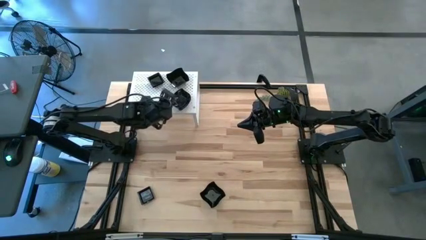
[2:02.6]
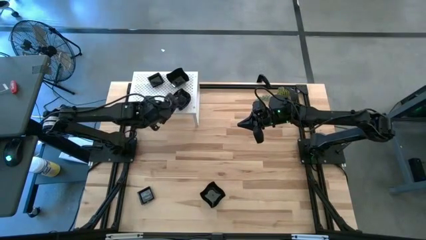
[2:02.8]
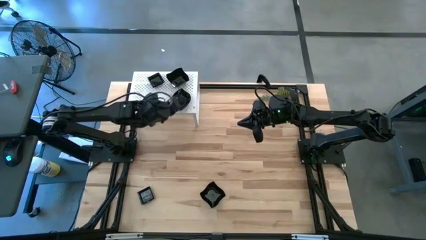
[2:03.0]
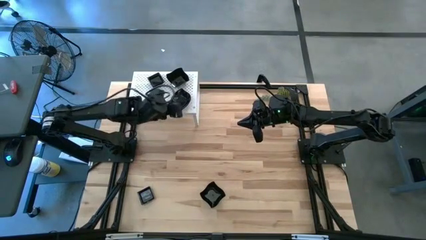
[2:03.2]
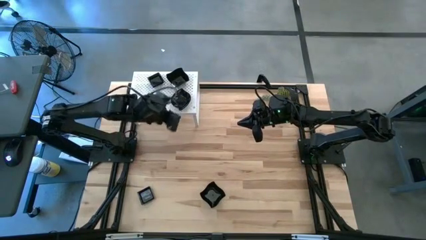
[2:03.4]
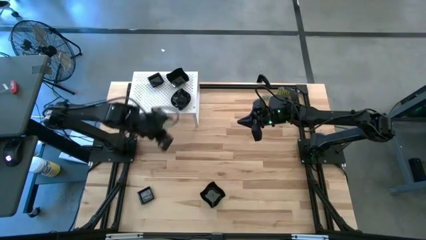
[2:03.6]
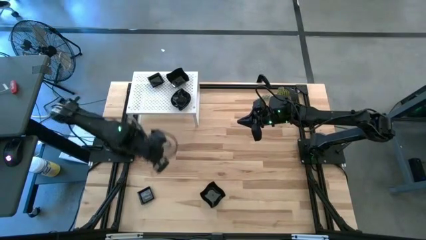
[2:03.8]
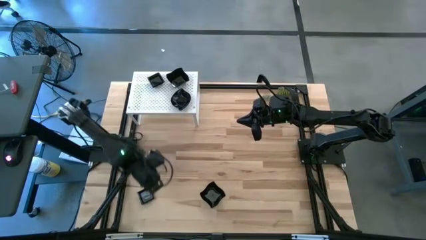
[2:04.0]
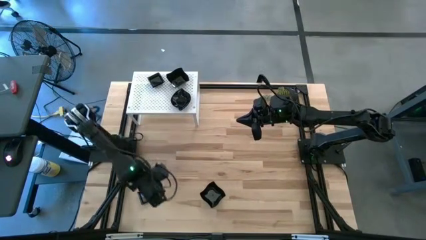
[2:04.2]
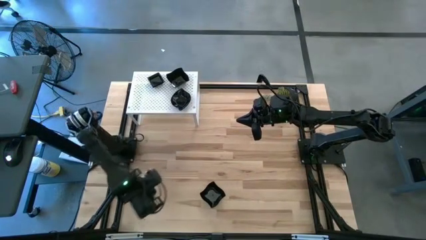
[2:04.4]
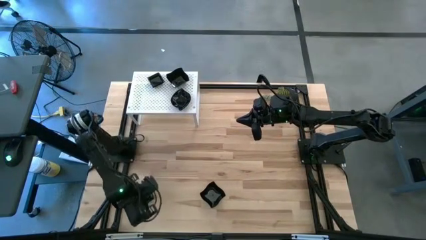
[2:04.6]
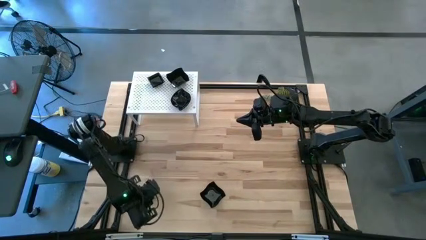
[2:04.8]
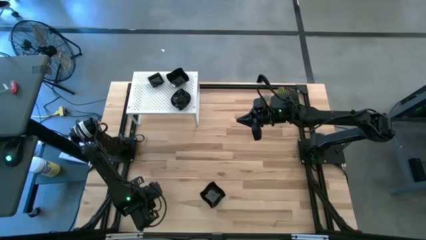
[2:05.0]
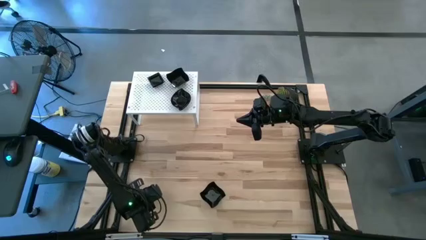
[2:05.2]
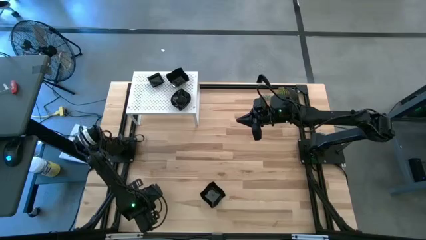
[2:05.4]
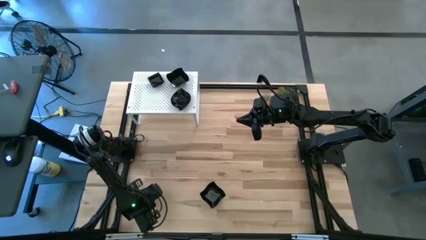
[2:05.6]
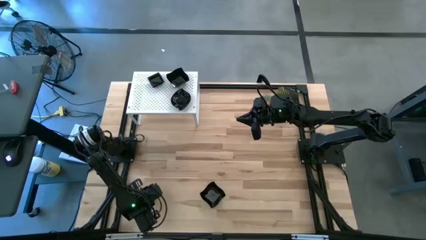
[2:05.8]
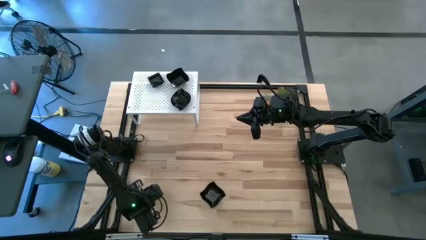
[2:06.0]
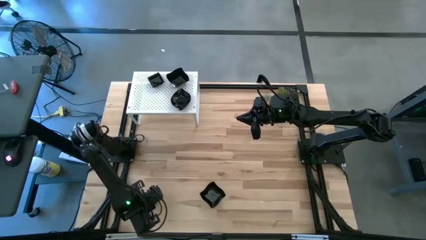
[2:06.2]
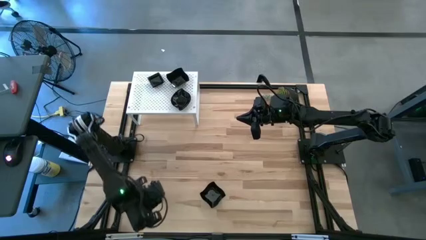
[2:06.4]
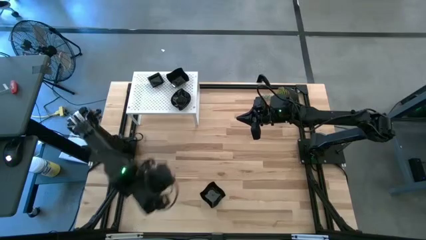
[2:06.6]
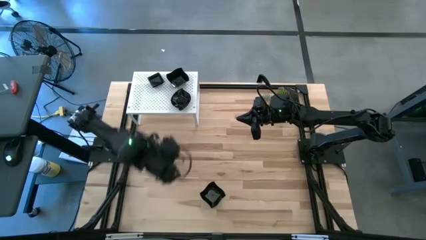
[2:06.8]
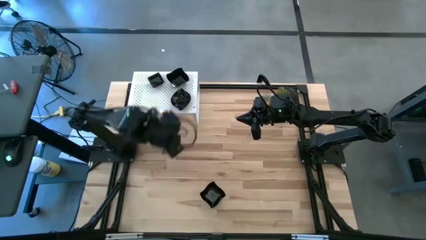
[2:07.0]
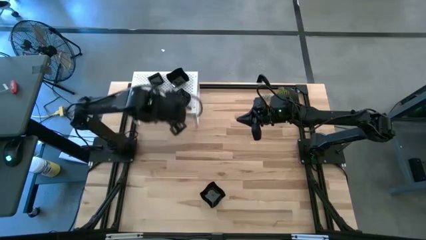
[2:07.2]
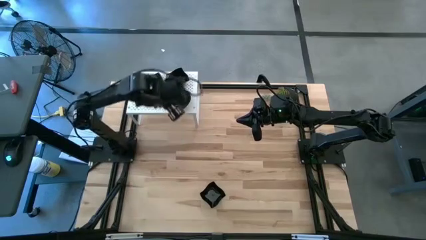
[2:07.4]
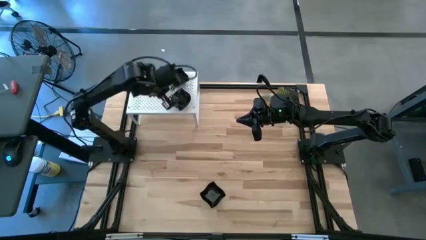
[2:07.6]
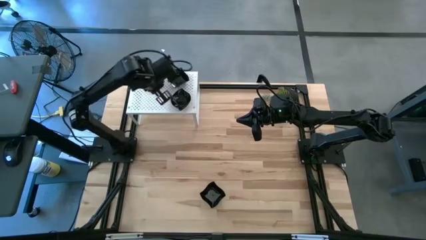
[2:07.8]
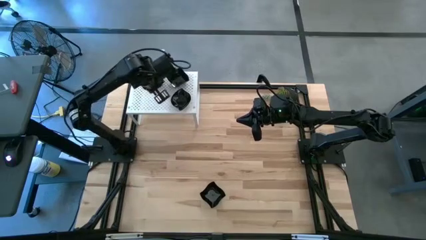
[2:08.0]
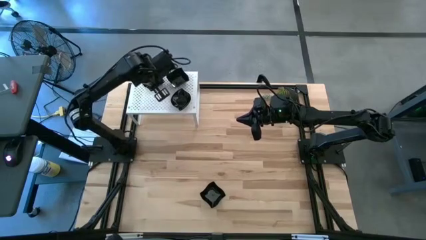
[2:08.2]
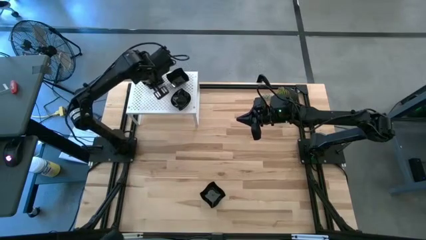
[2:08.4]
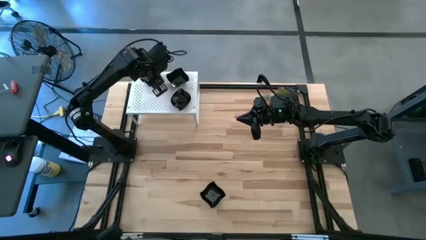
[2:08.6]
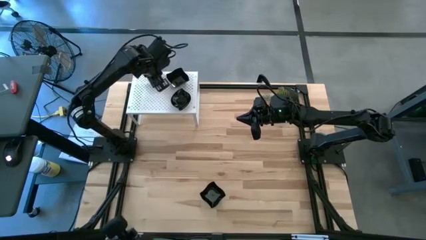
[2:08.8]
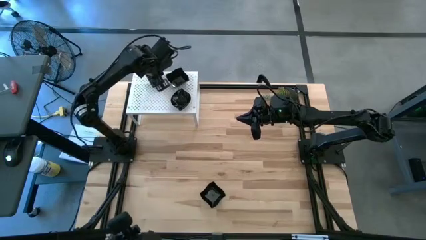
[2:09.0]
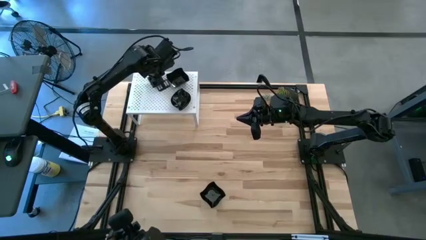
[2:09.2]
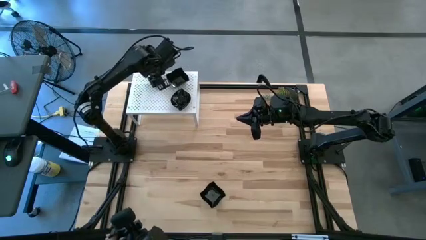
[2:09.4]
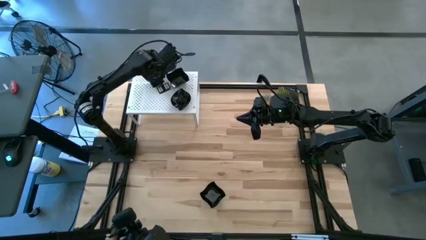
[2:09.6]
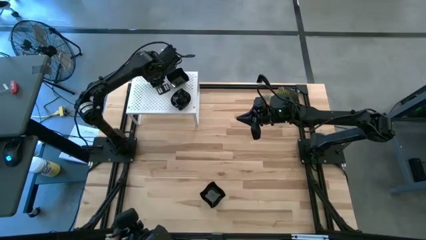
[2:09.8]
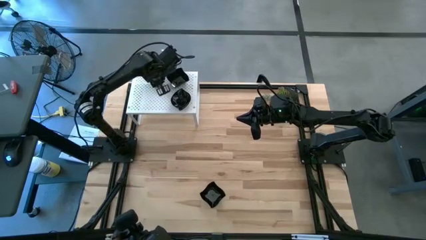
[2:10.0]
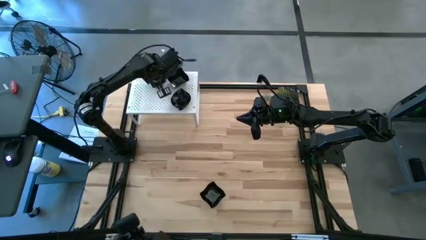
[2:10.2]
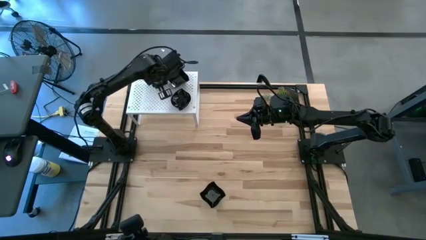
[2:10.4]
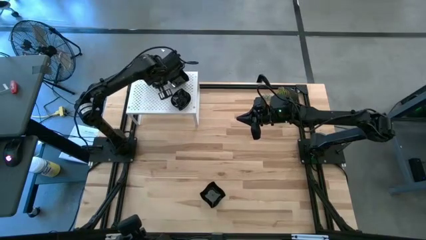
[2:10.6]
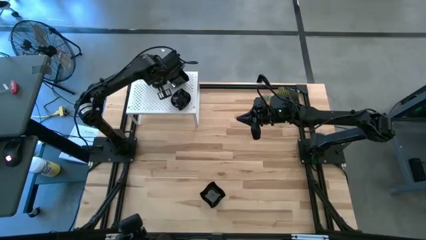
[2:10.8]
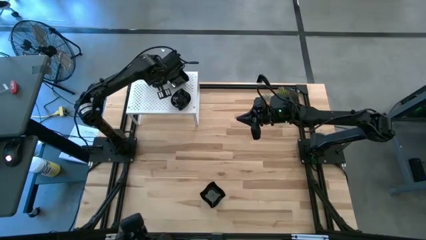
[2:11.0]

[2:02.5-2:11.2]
Task: Pick & Place Mini shaped plates
Stack the black square plate on top of the other black square plates on the shelf

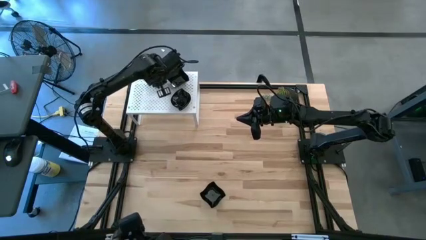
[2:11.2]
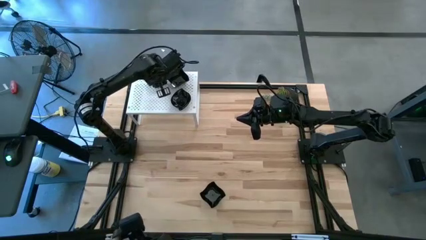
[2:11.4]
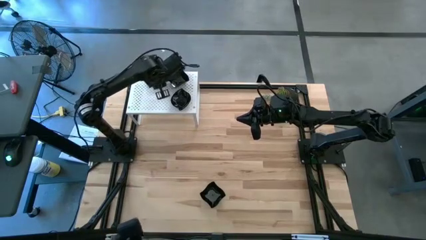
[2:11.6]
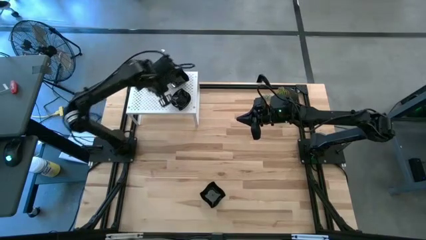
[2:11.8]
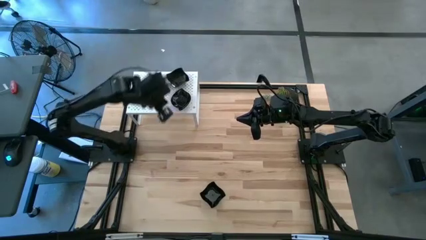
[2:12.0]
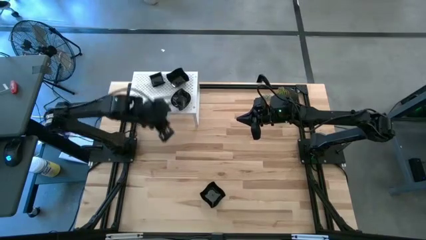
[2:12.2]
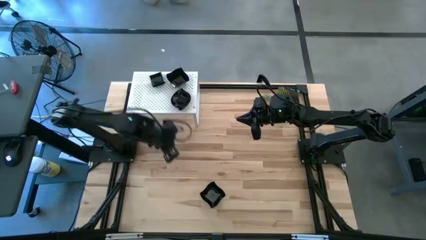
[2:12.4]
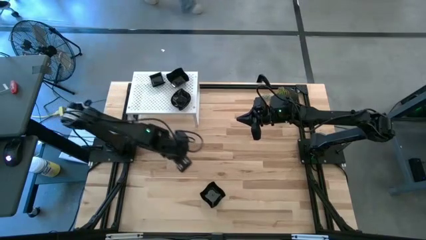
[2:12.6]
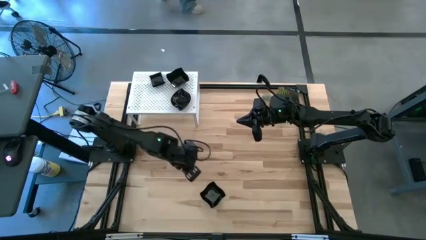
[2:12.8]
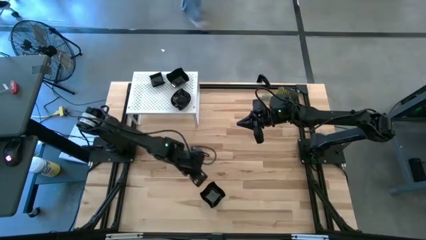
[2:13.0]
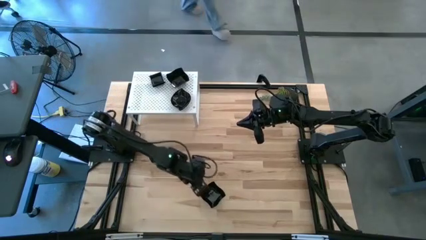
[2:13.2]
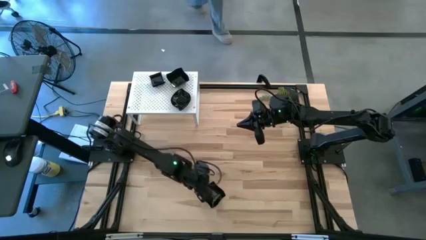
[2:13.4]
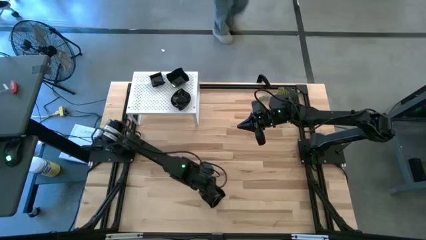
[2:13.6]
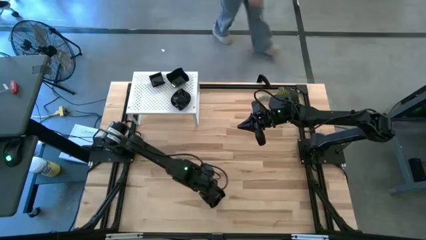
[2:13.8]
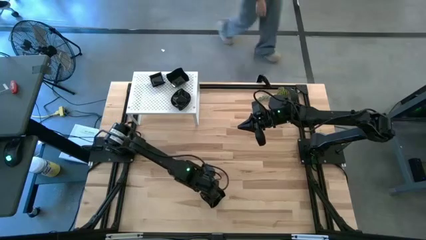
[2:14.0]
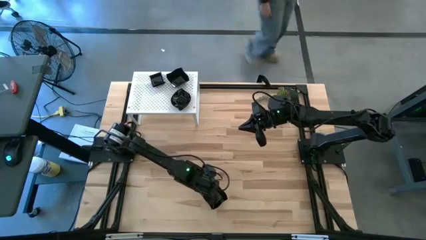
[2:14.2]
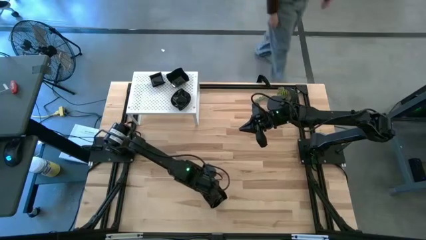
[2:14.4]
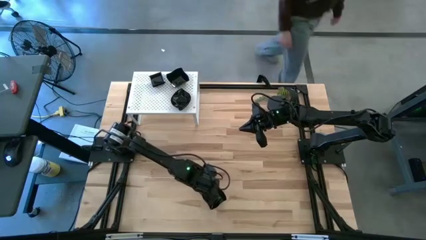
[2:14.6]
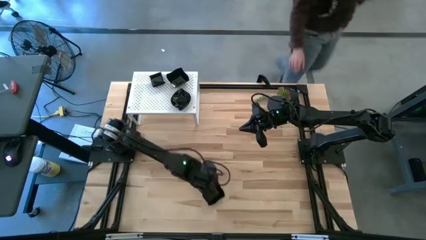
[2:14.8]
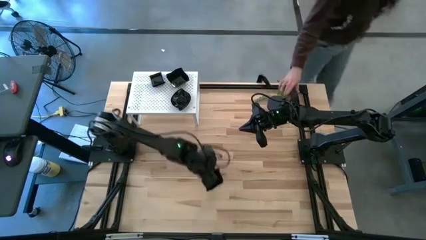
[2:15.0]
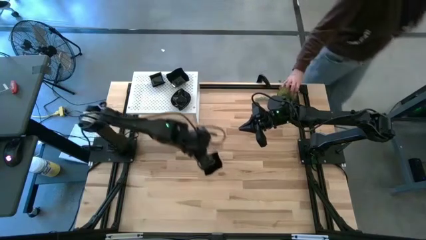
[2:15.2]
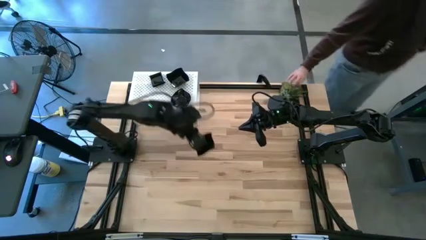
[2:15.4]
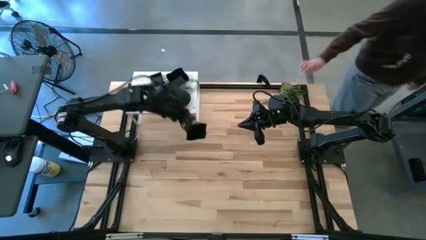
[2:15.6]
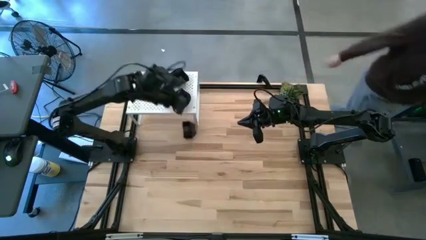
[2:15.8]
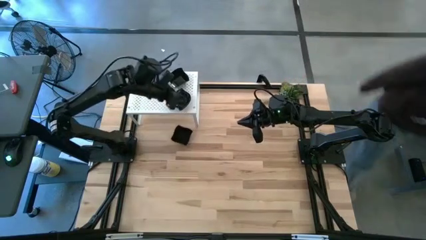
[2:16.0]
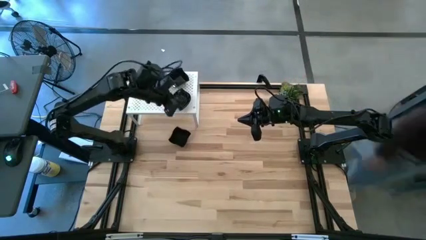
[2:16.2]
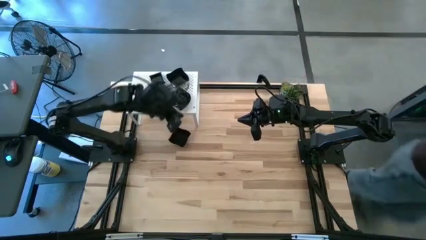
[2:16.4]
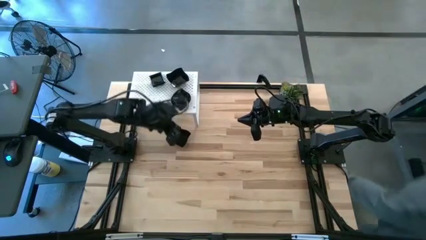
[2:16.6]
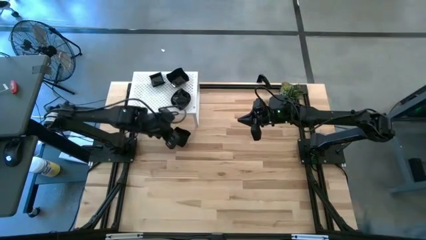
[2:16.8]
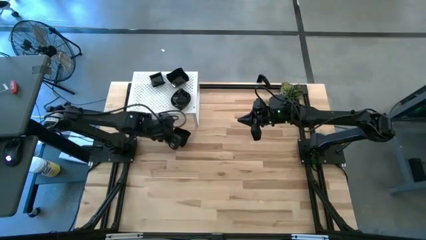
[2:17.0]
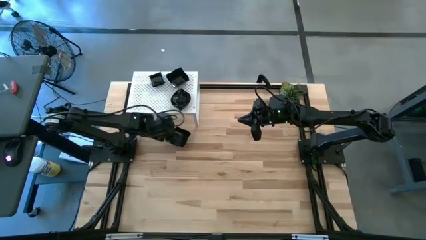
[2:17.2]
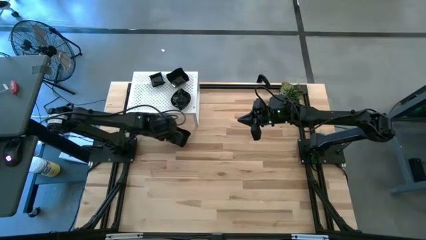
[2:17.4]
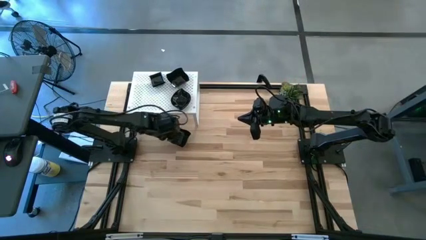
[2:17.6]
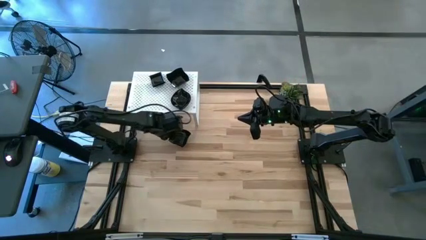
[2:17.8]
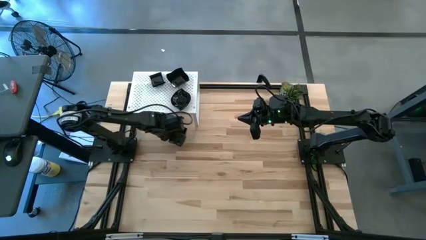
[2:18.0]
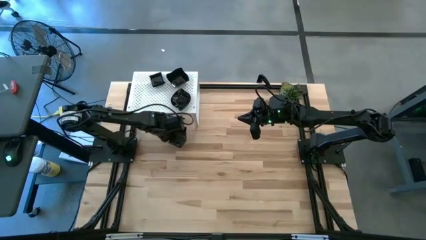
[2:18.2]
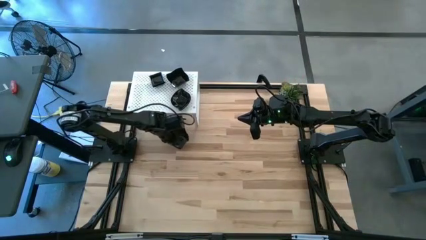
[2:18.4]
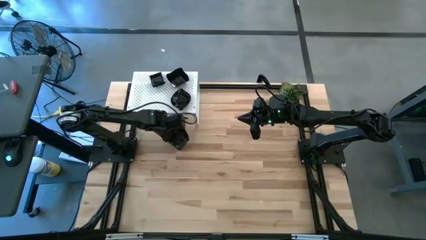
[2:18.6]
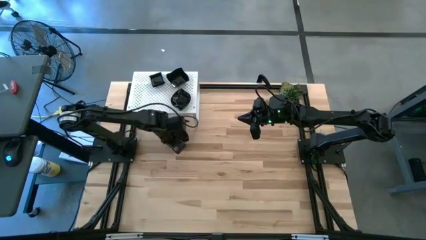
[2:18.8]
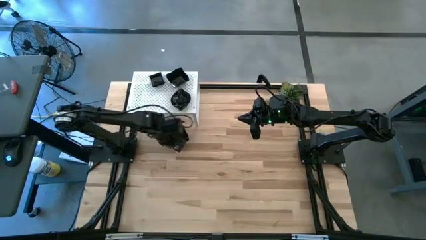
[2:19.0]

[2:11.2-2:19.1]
Stack the black distorted square plate on top of the other black distorted square plates on the shelf
